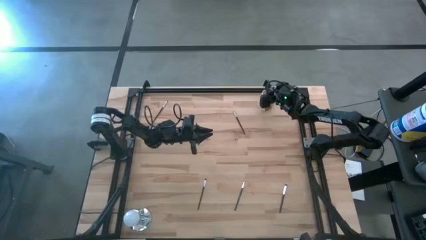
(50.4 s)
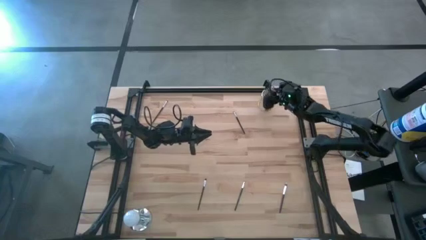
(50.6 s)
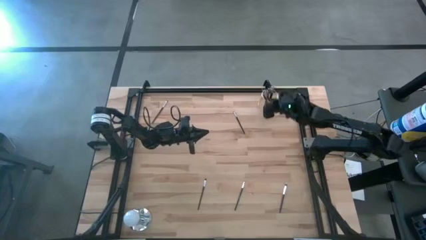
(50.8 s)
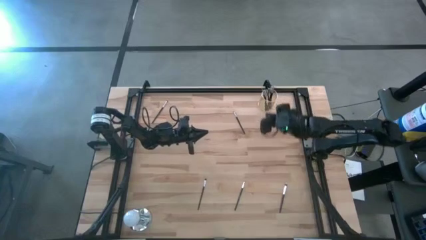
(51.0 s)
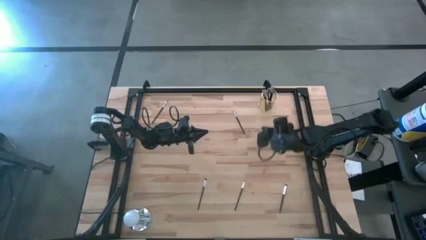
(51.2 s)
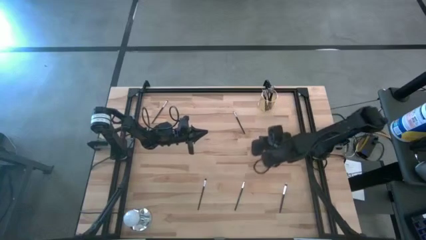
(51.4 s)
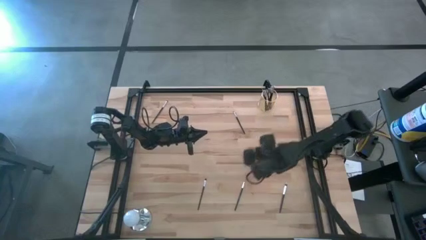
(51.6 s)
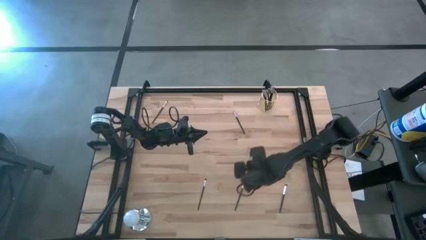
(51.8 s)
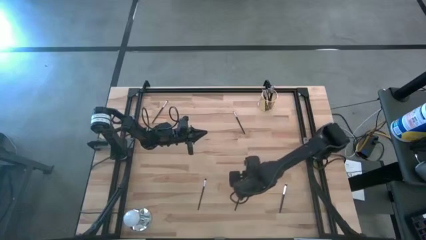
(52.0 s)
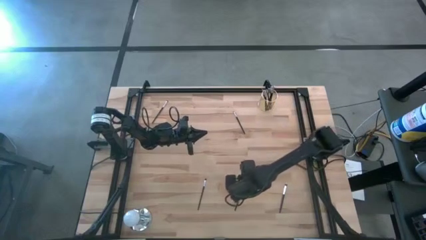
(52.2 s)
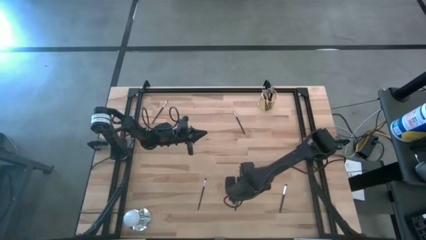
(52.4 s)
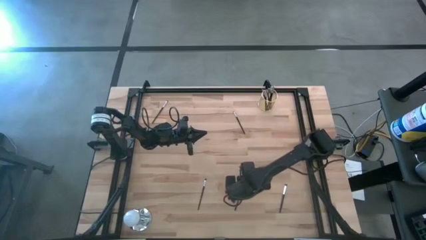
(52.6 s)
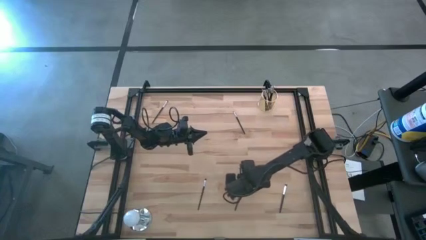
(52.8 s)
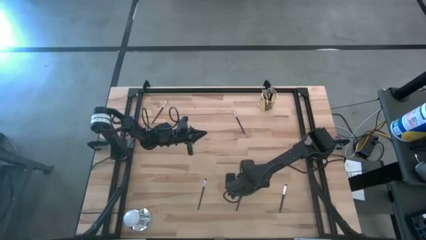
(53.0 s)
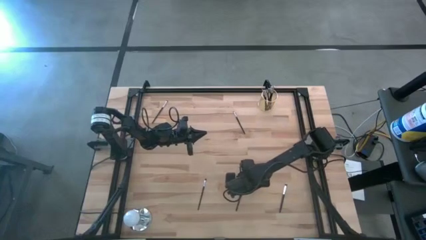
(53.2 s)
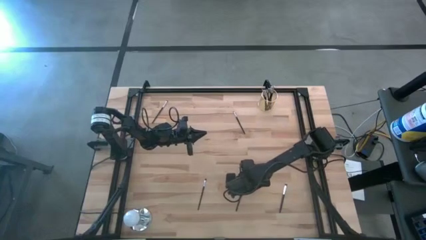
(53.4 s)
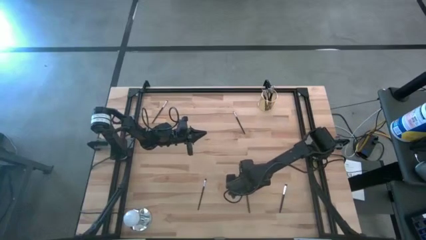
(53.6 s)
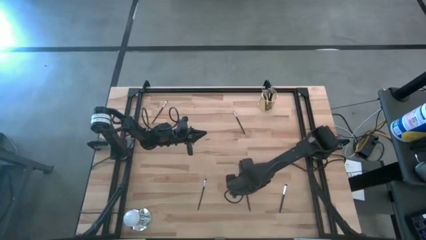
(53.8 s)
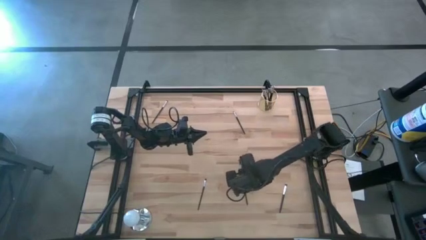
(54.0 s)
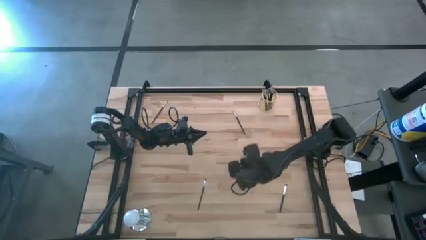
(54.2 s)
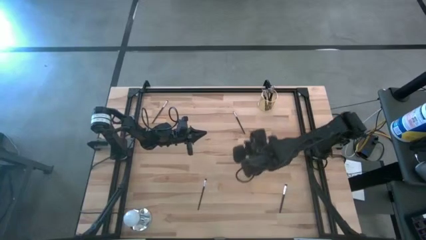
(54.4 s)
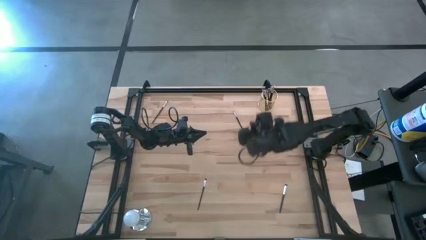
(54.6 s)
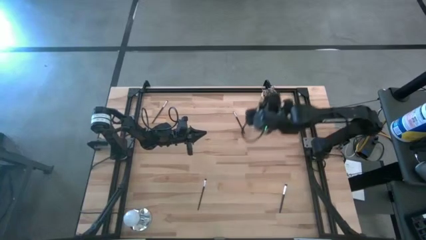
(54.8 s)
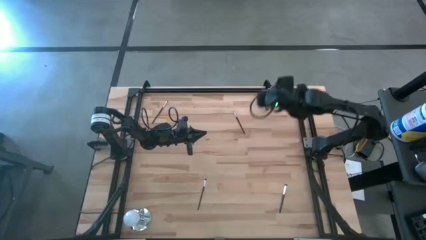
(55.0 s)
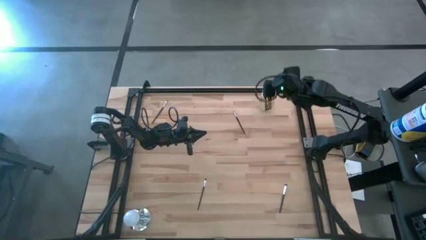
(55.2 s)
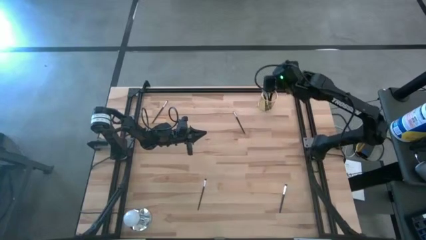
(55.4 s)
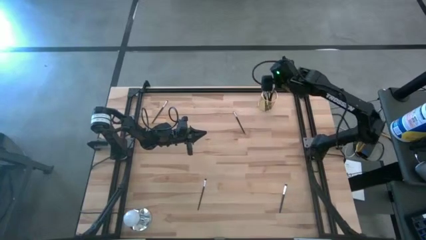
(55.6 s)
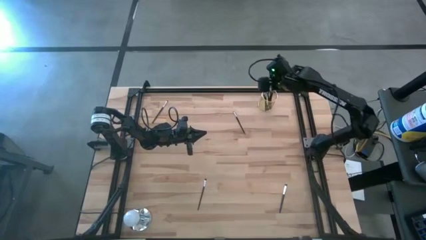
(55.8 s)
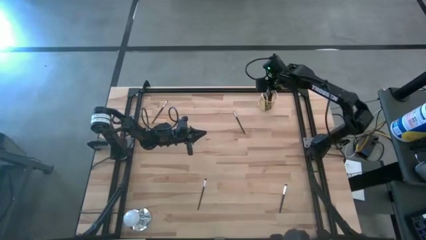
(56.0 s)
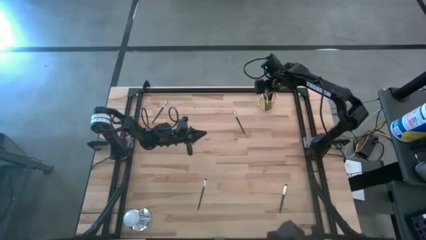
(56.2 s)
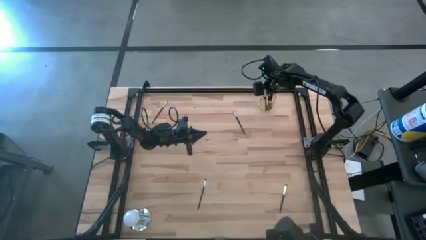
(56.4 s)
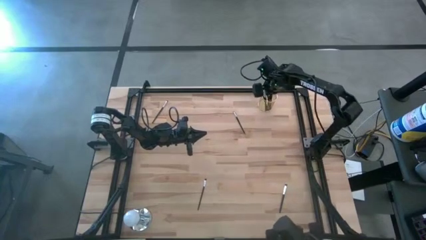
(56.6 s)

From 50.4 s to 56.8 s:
Task: Put items in baskets/containers
Put the black liner brush into the gold pen holder

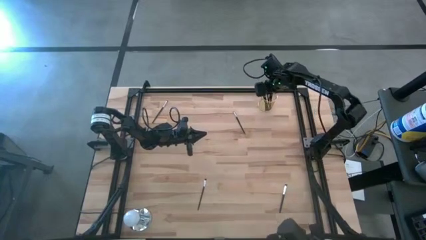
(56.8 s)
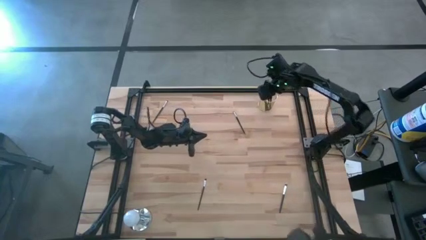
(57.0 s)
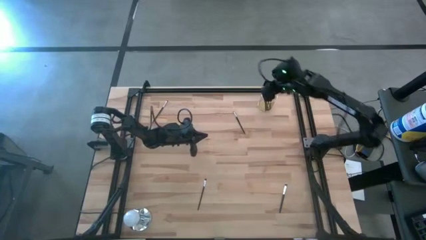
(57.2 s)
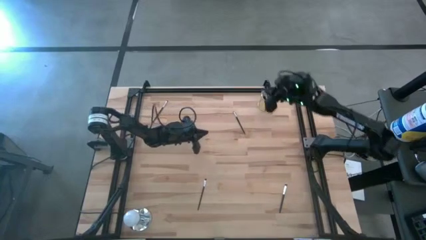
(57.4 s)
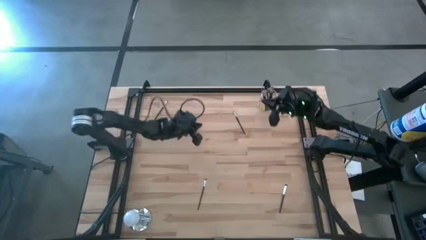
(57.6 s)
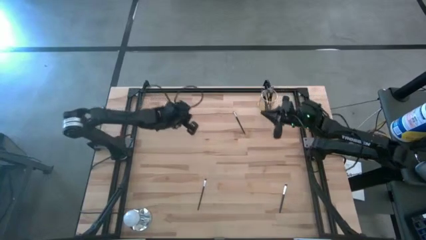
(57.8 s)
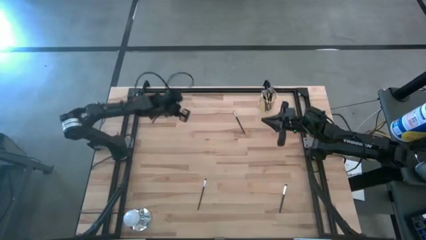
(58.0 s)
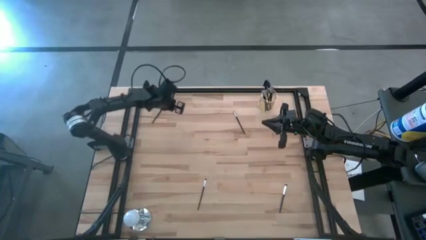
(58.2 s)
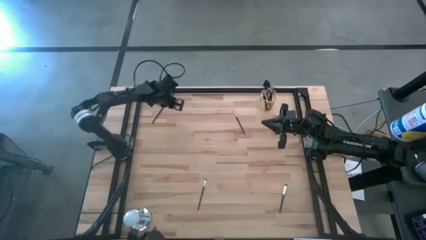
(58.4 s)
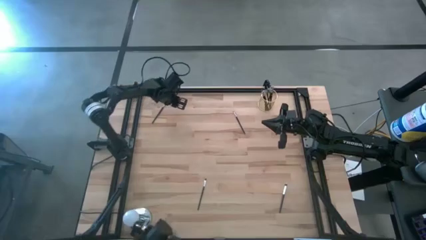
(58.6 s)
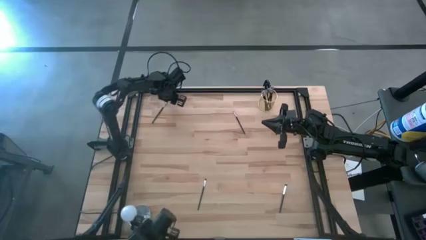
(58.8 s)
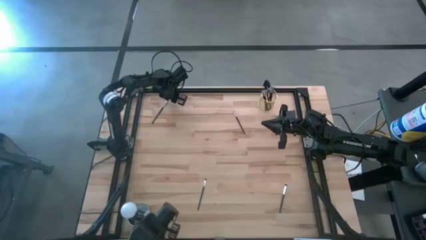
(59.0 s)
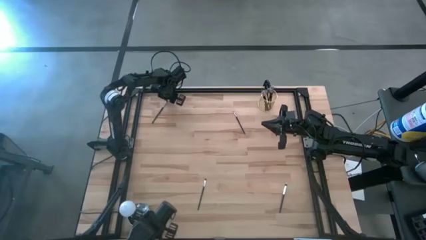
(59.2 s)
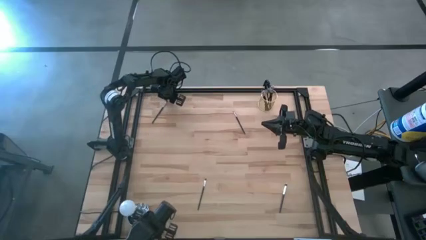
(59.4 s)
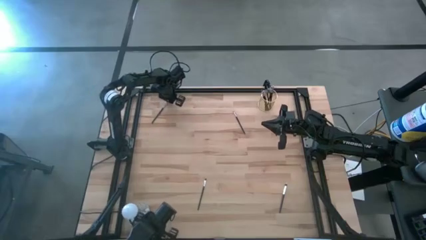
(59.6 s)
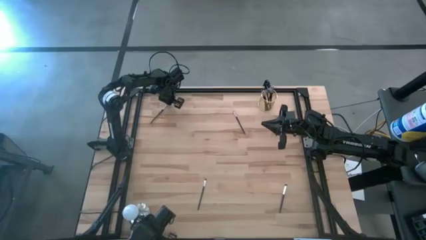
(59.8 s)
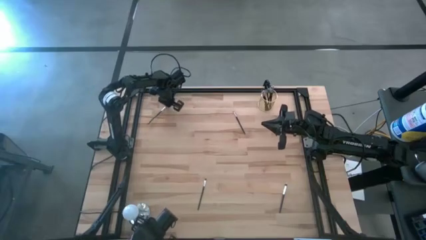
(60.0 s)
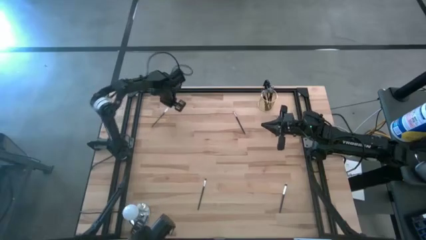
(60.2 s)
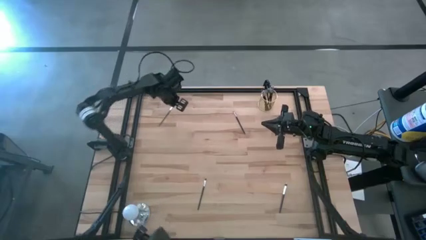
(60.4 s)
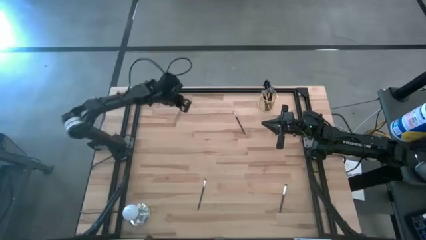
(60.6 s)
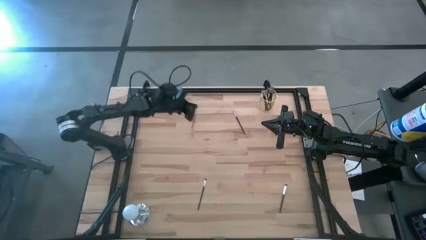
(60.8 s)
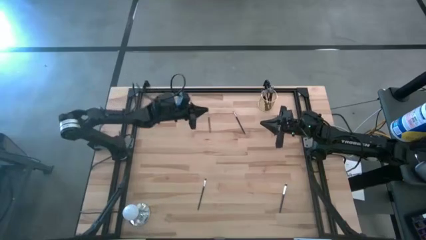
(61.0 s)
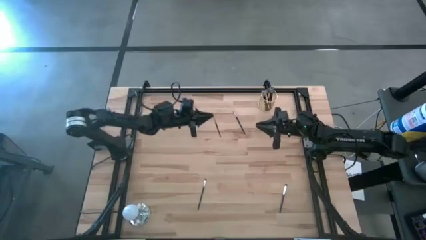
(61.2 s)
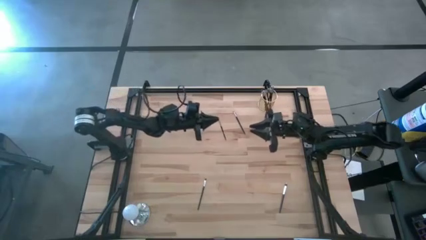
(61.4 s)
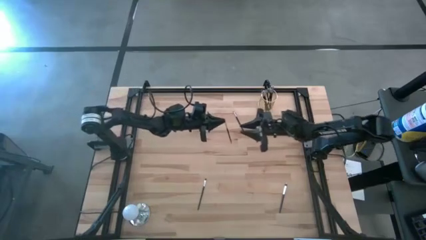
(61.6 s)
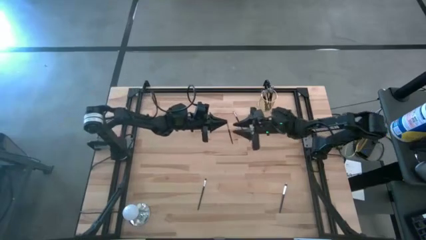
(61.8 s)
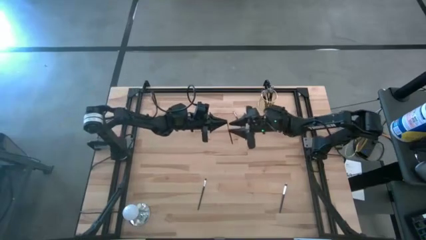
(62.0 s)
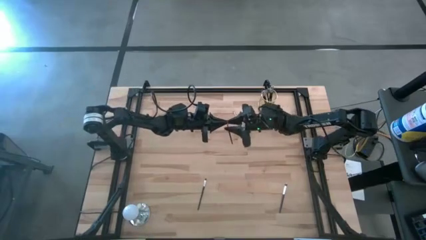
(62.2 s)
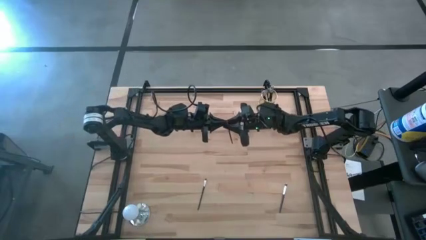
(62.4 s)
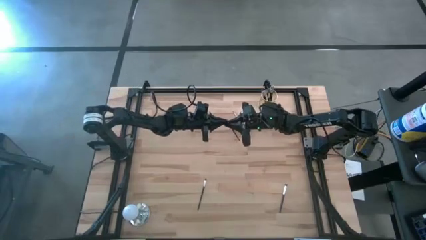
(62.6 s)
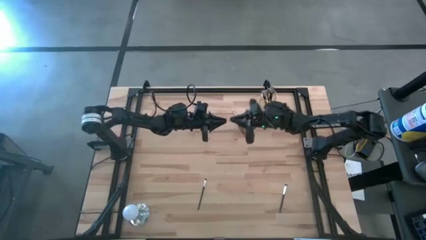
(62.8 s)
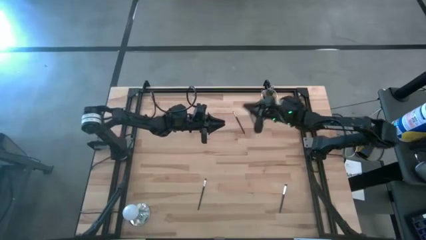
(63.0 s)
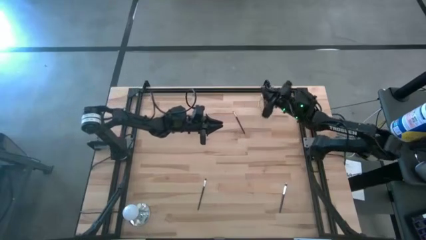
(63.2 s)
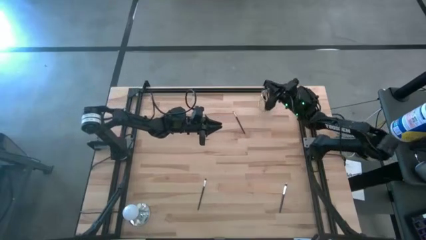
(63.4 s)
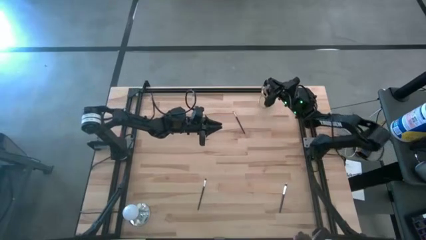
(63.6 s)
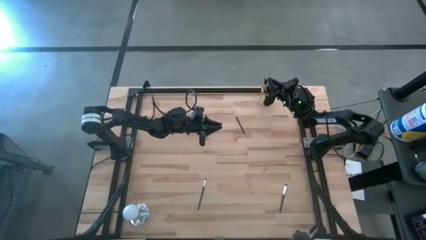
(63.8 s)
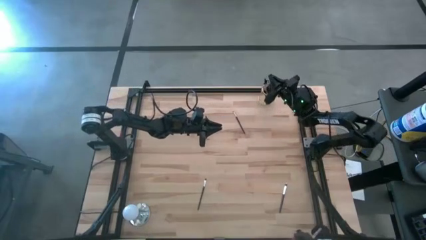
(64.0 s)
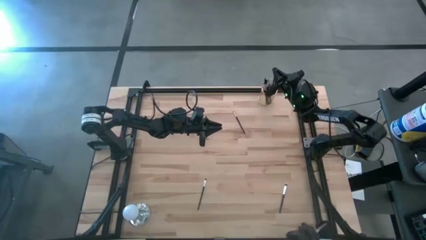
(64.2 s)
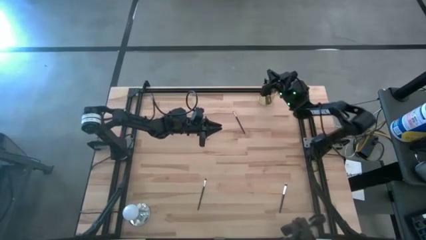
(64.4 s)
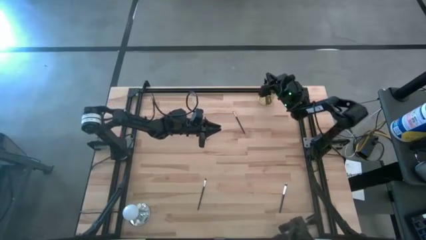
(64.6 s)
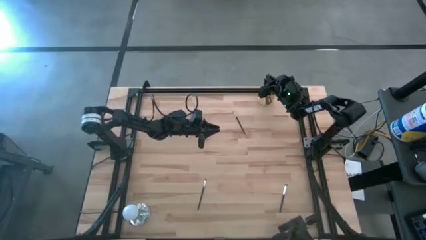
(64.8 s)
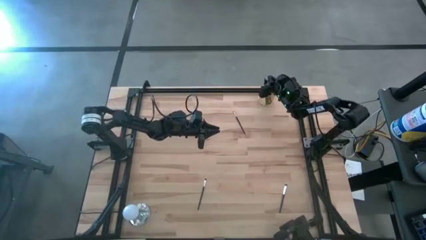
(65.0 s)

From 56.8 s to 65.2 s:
Put the black eyeshadow brush into the gold pen holder

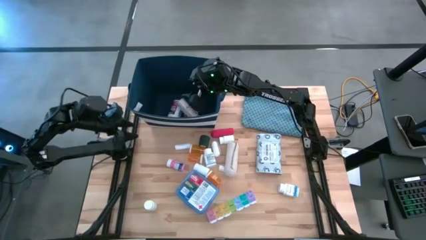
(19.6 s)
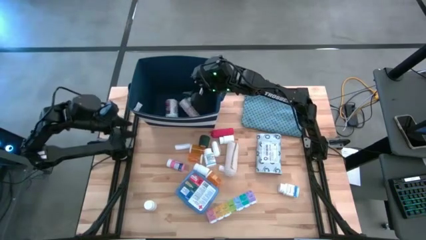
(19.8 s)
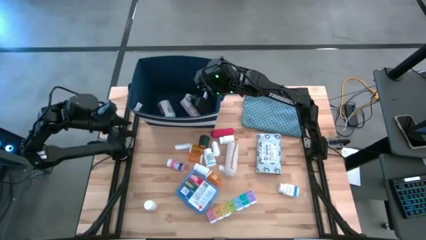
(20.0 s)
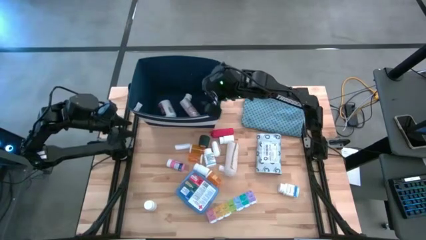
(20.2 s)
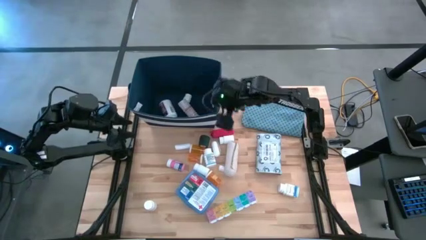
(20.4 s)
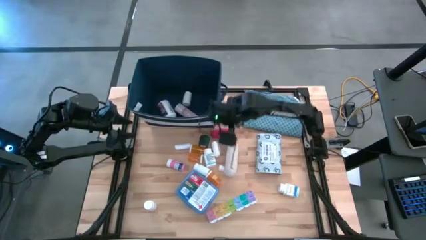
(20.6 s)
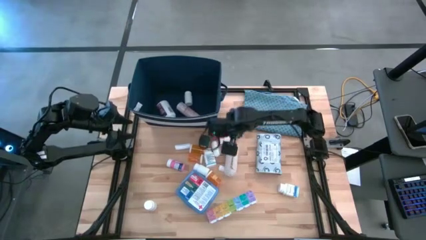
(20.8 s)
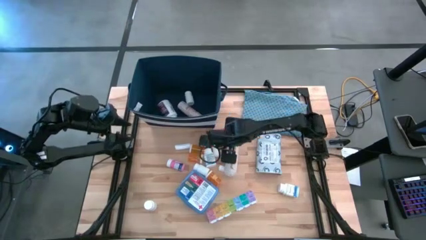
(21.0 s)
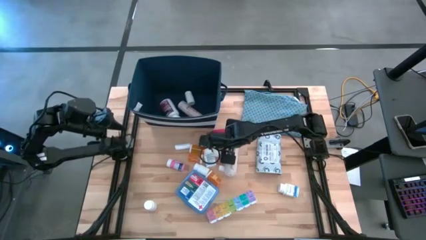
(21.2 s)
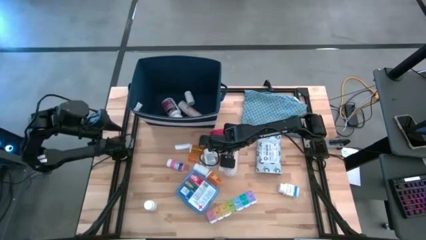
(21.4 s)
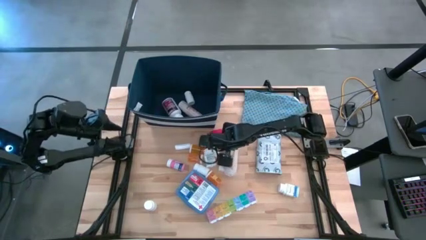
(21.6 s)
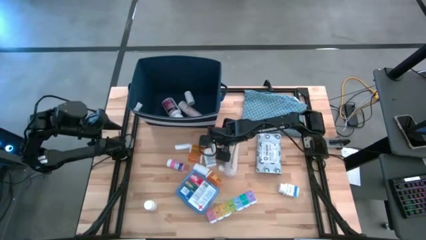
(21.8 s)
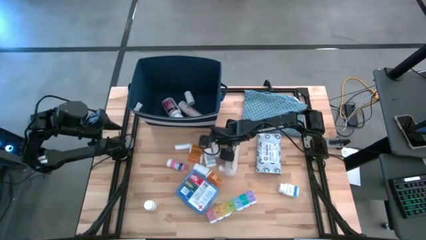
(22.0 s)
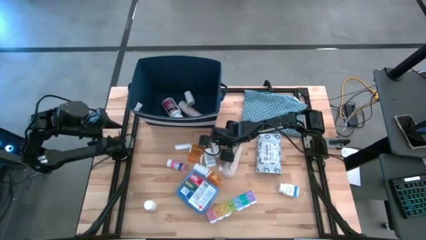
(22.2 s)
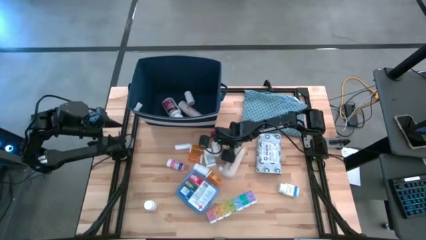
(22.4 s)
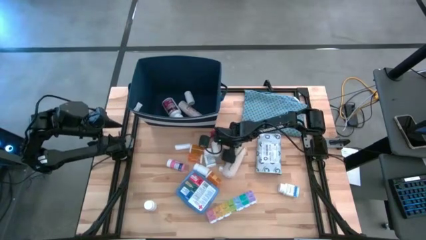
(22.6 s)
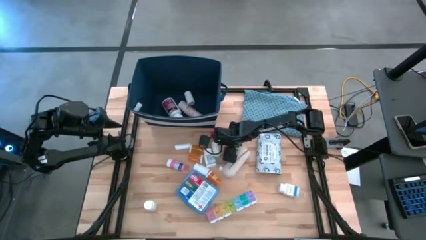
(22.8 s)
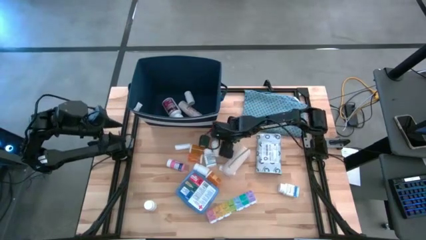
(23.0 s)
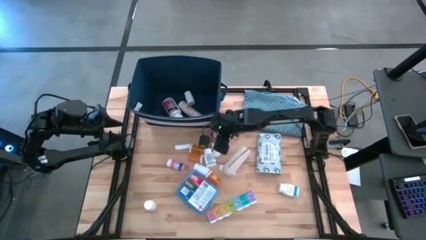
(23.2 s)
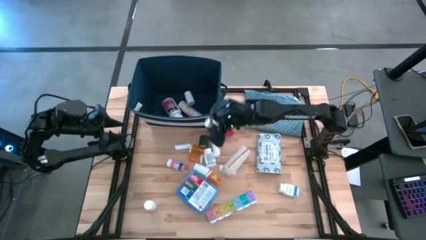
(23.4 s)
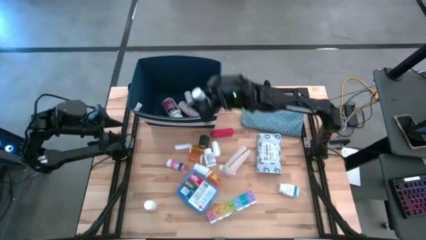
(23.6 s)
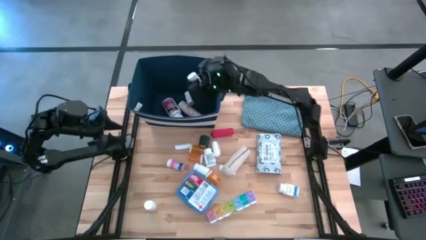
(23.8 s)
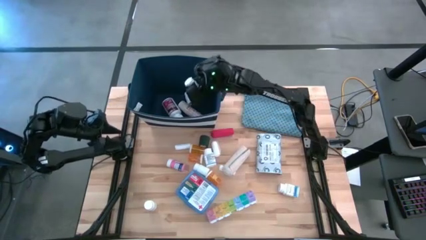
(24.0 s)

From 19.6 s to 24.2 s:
Task: Pick & place medical supplies in basket/bin
Put the white pill bottle into the blue bin
